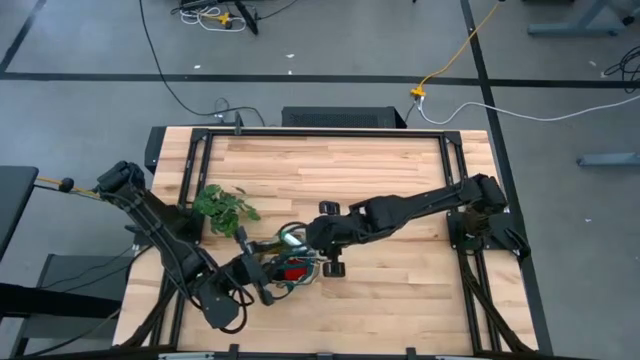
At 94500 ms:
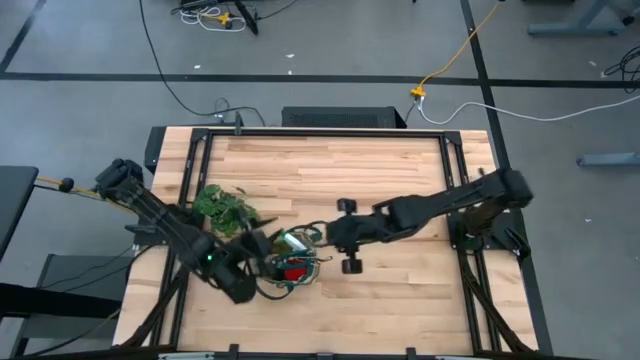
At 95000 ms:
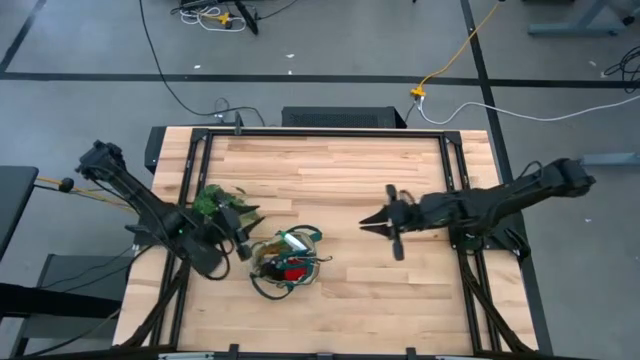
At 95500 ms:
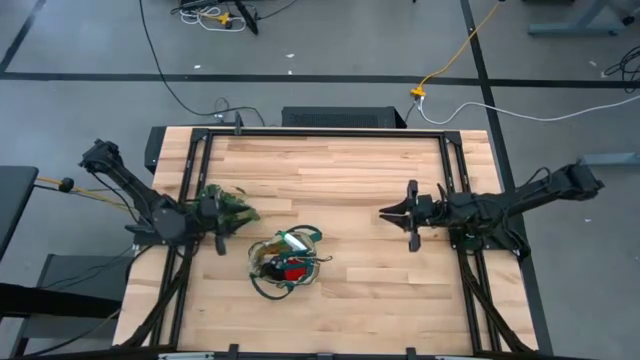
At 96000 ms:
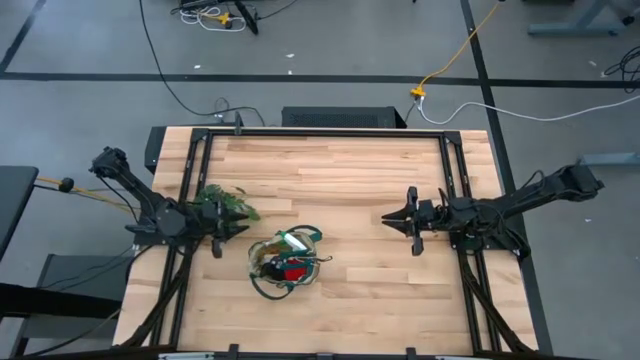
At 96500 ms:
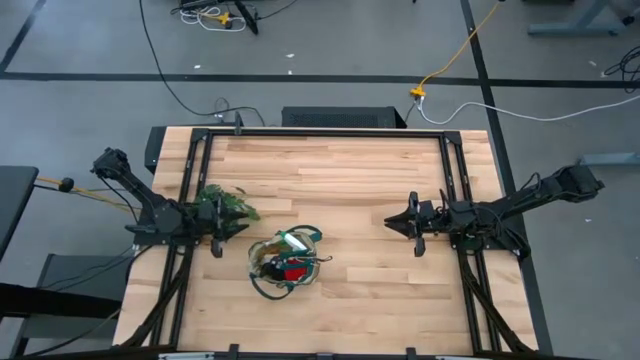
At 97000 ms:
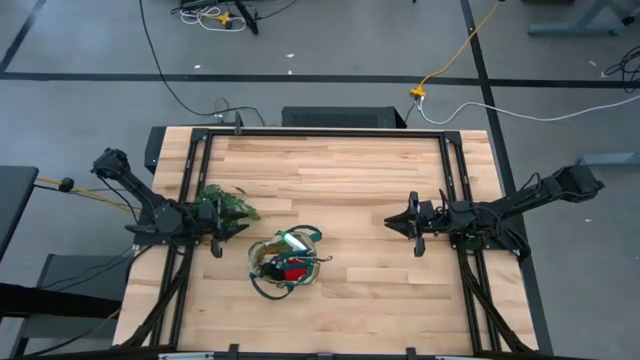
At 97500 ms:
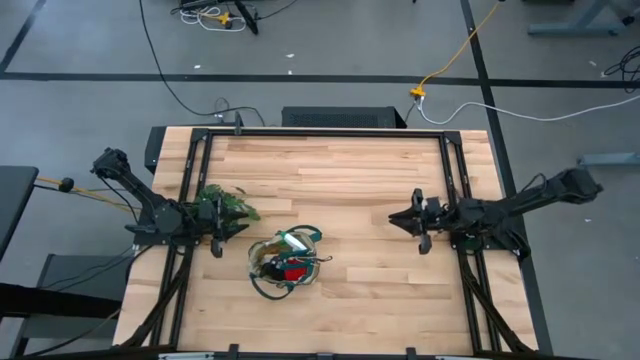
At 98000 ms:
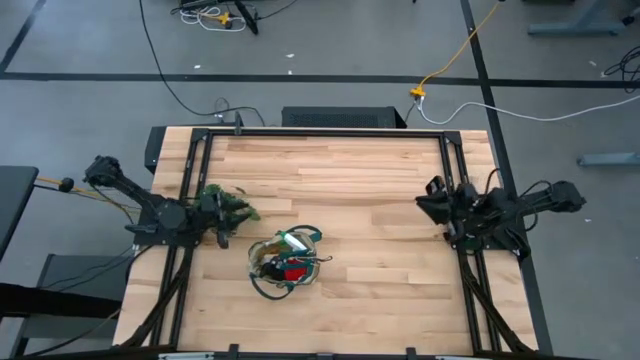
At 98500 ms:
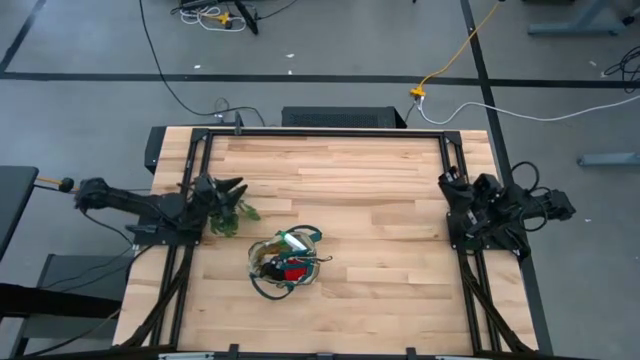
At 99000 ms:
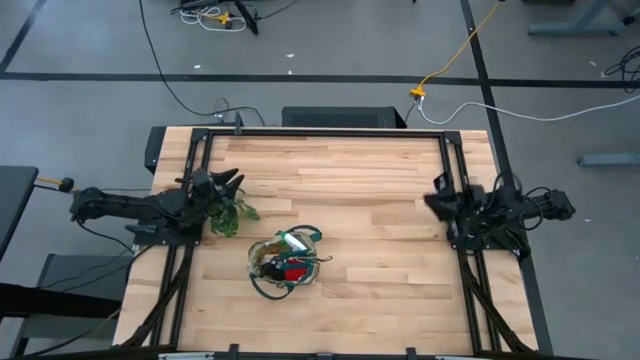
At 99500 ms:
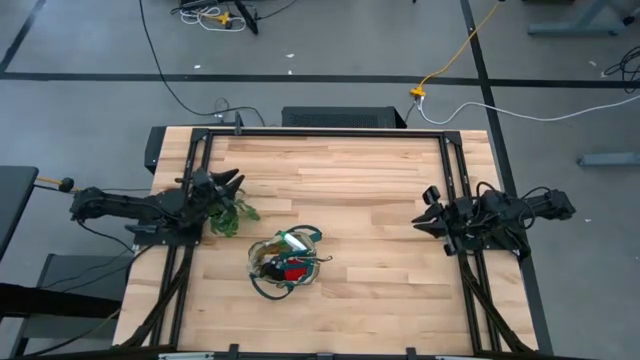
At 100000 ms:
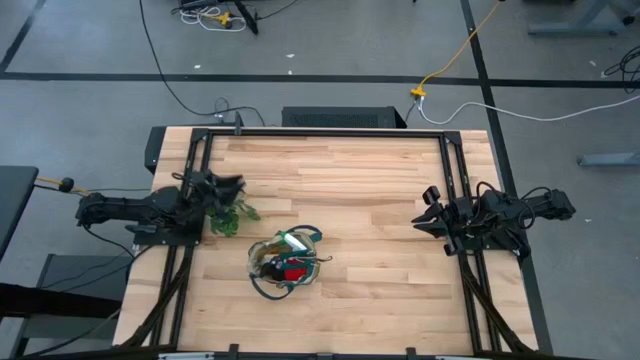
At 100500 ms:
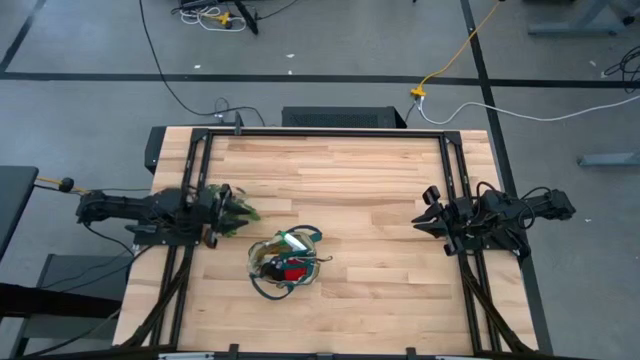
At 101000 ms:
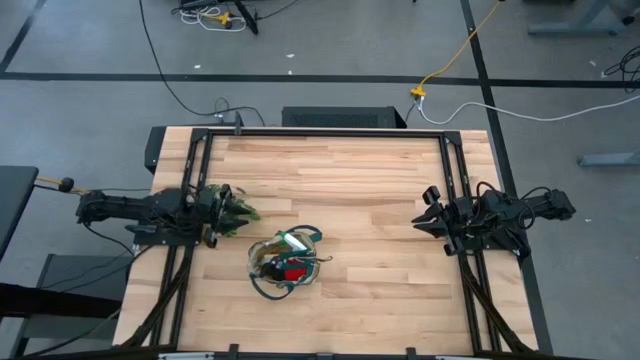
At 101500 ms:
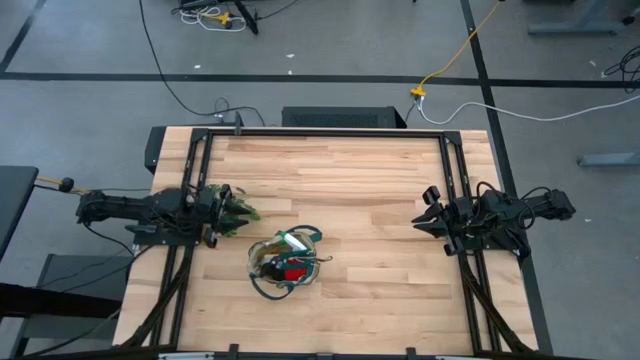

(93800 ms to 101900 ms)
Task: Pick & Place Garden tools in Gardening bag
Return to Home Position

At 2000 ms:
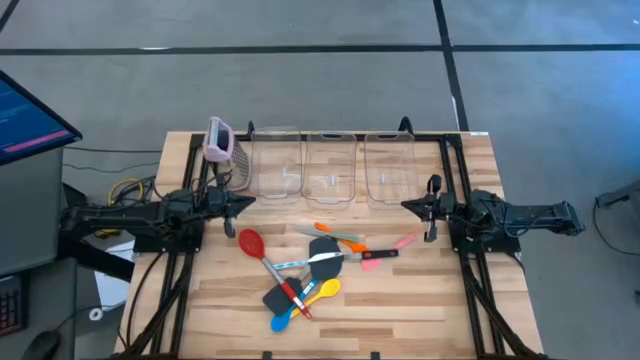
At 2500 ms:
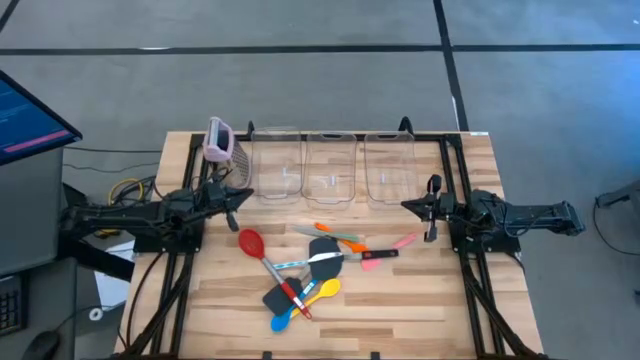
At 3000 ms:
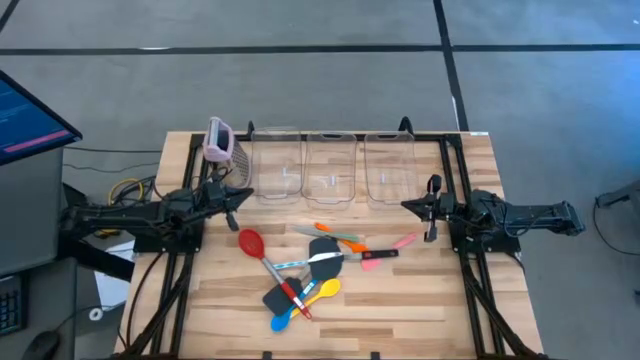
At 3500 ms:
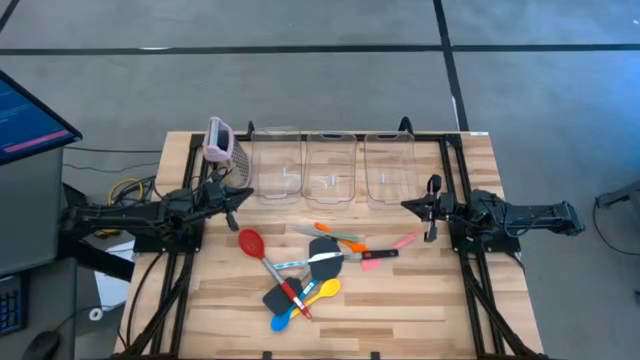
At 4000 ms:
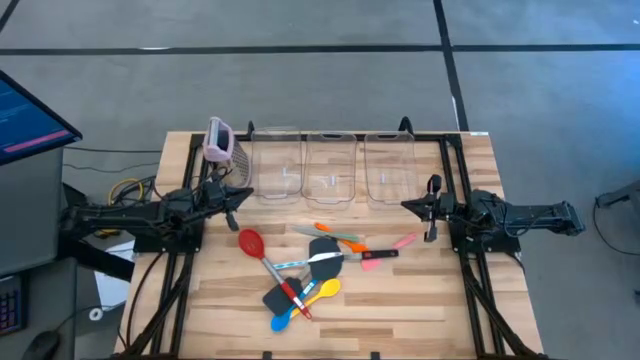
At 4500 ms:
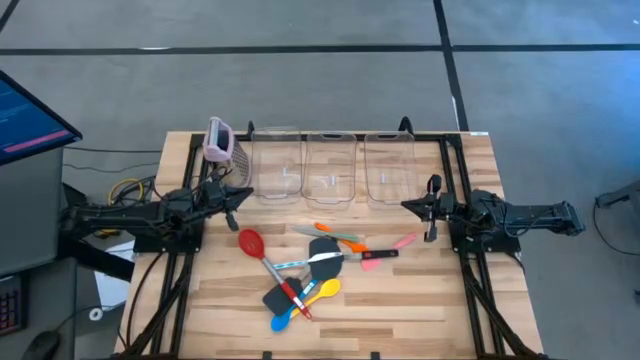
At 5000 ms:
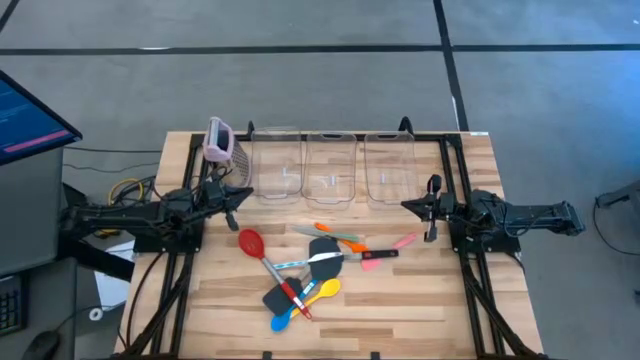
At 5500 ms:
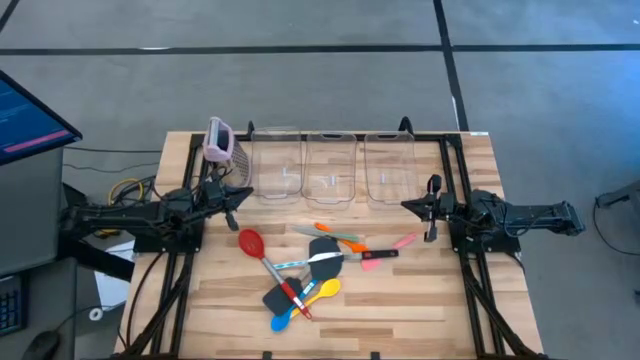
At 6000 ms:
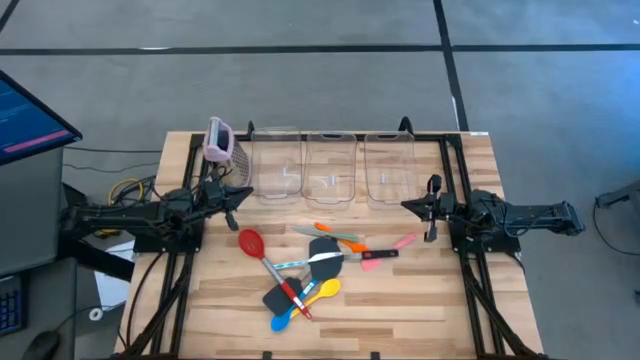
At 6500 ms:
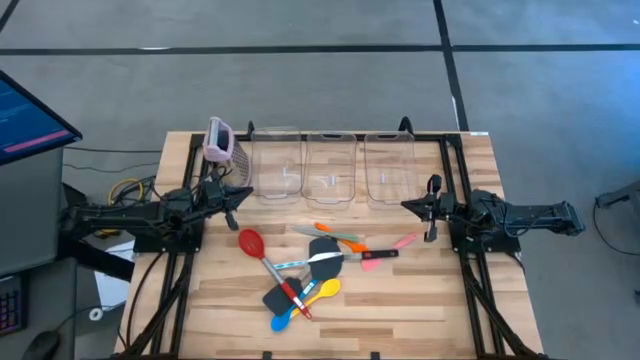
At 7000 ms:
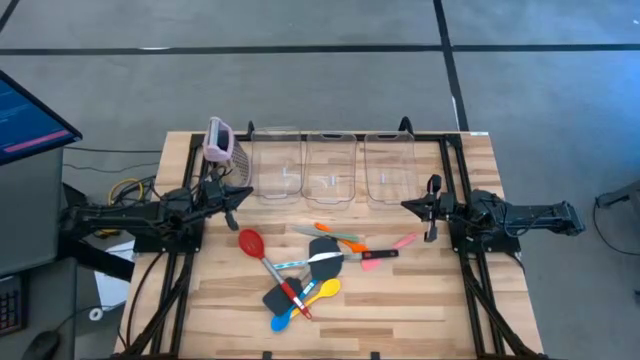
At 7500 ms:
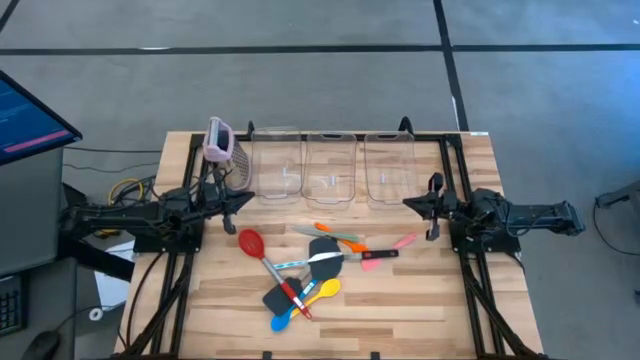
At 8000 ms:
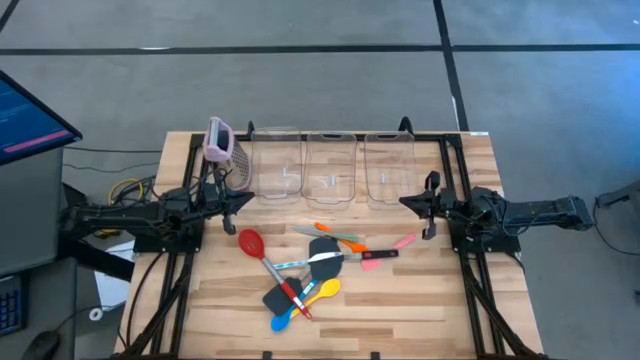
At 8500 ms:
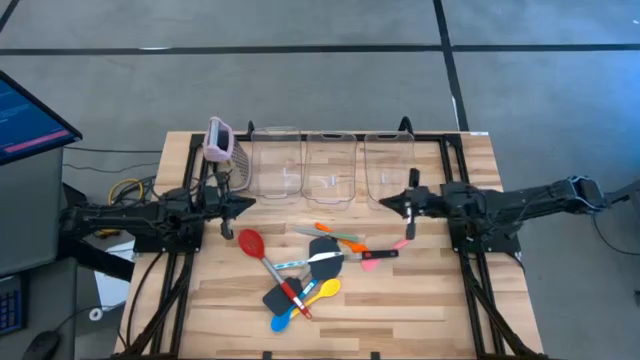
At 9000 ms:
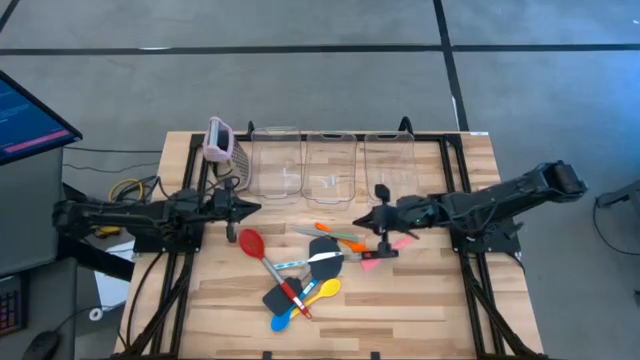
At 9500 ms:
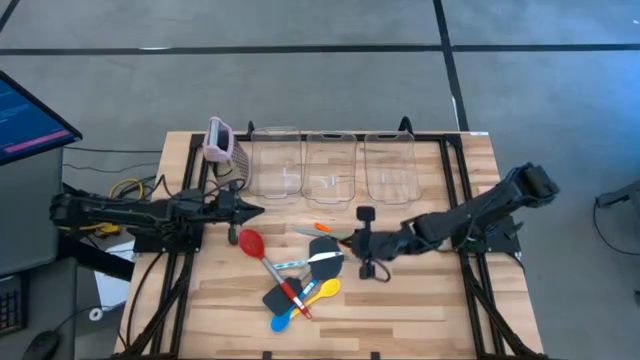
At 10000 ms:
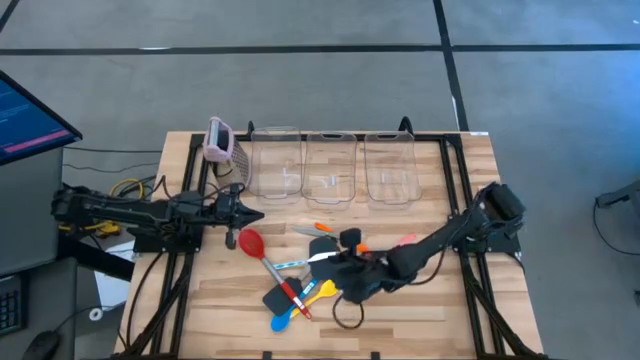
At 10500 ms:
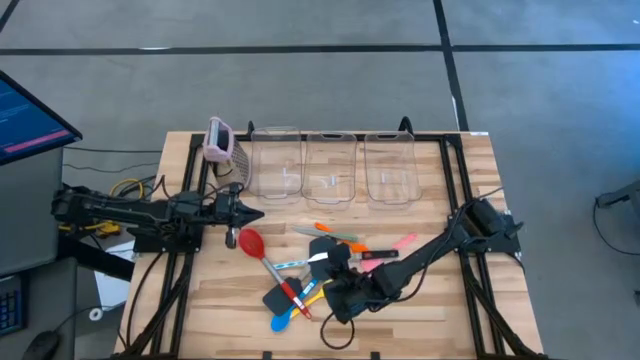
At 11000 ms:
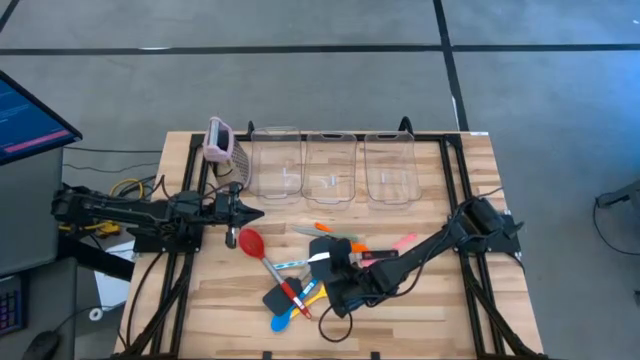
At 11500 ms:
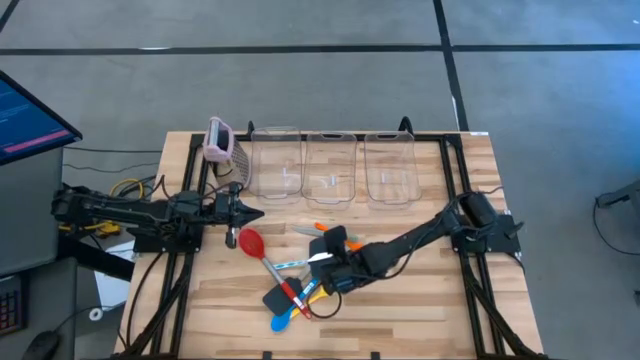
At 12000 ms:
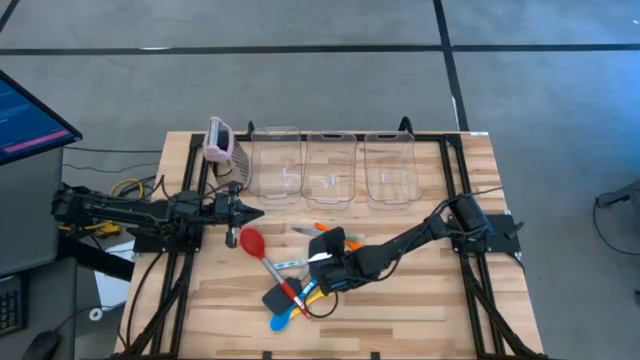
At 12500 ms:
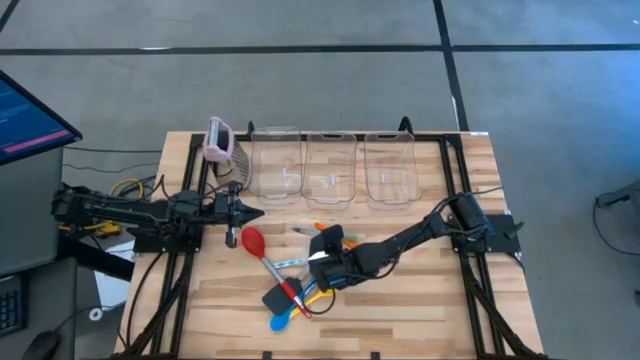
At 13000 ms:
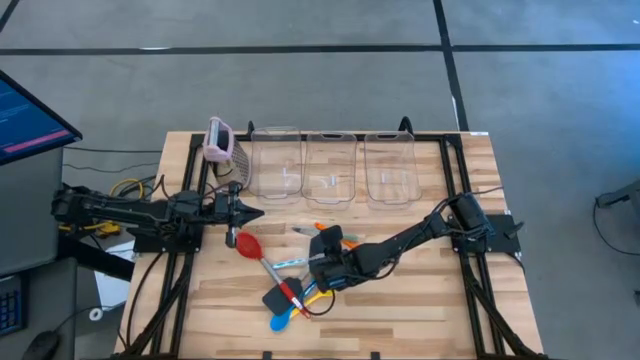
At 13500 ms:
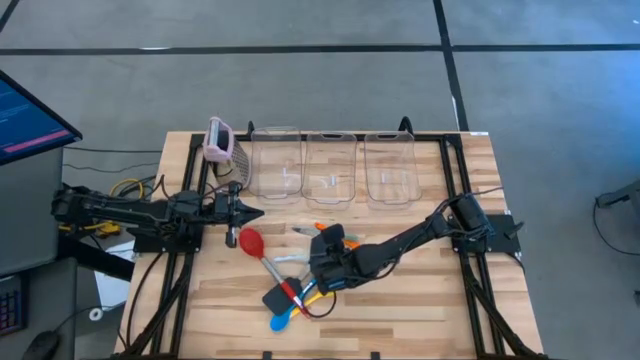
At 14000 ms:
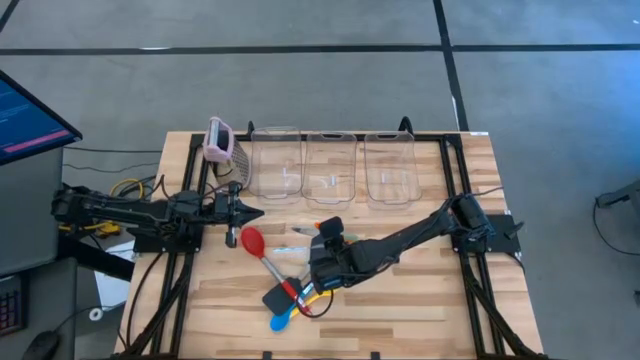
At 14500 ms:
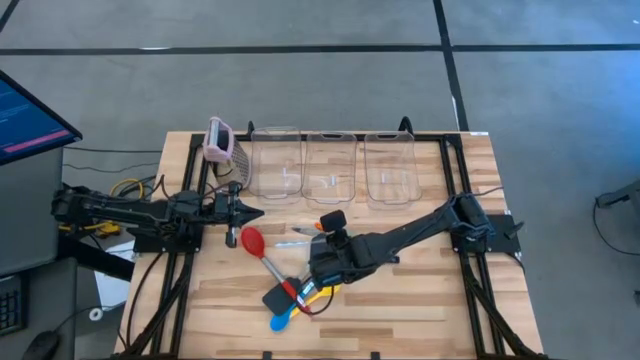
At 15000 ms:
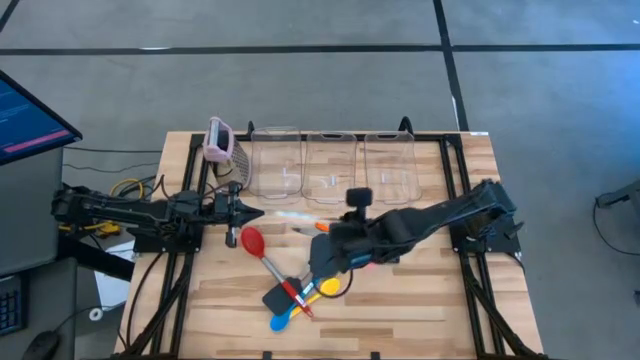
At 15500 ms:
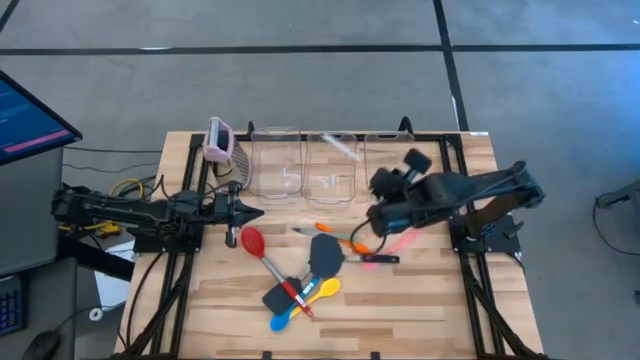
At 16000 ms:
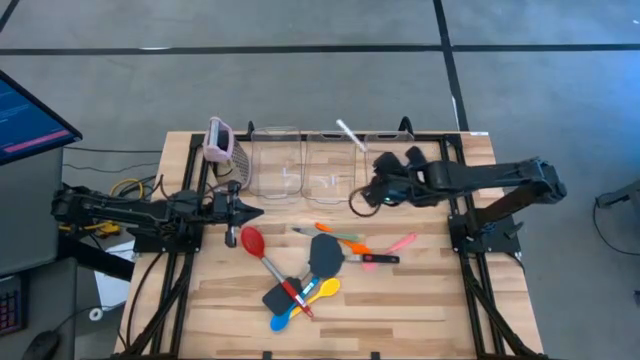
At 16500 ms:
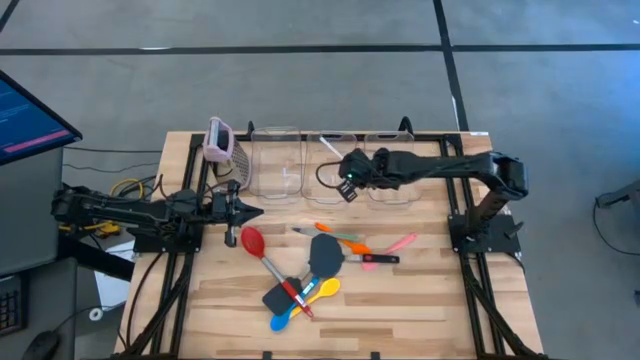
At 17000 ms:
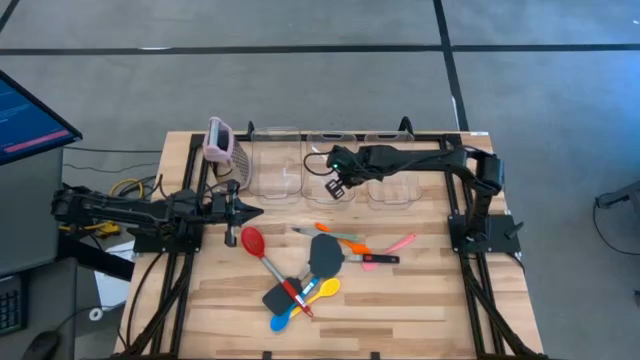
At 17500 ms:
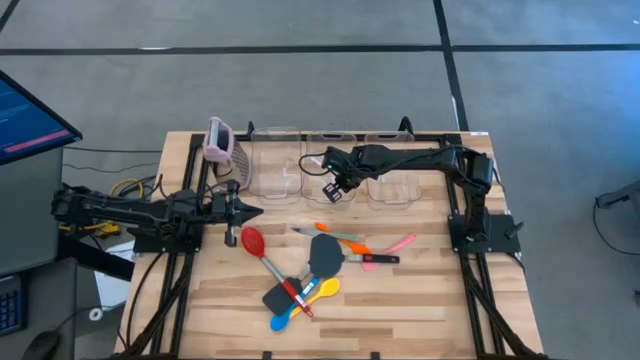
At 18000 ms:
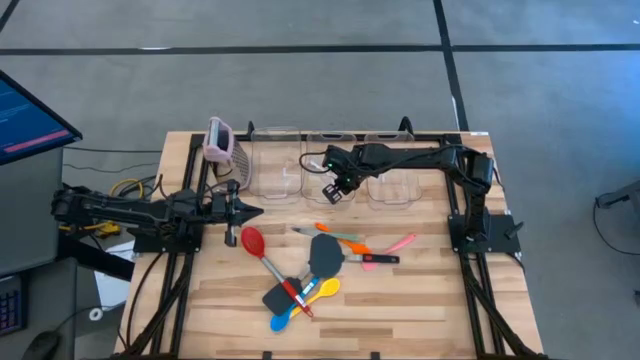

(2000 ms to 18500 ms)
Task: Pick & Place Kitchen Items
Put the white blue table knife into the middle transparent bin
